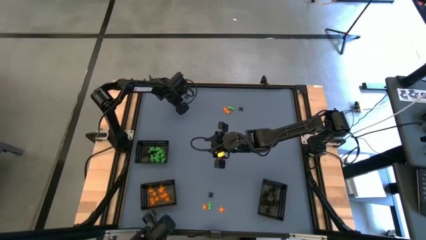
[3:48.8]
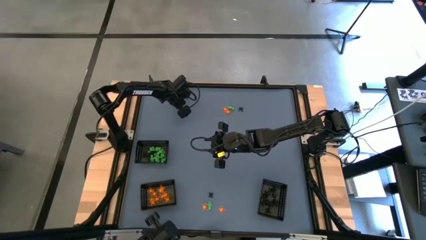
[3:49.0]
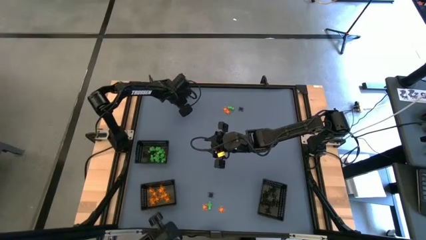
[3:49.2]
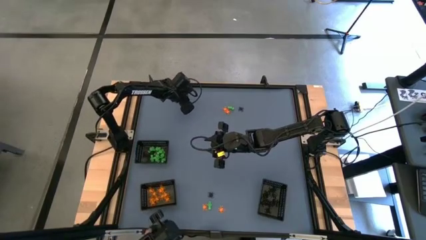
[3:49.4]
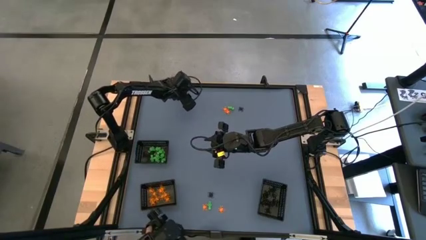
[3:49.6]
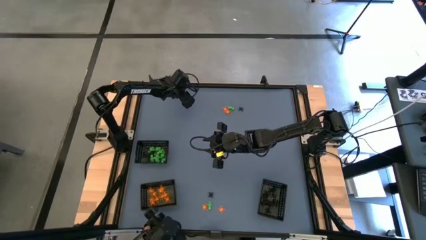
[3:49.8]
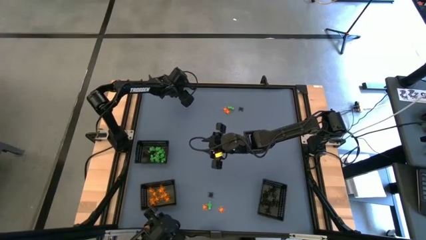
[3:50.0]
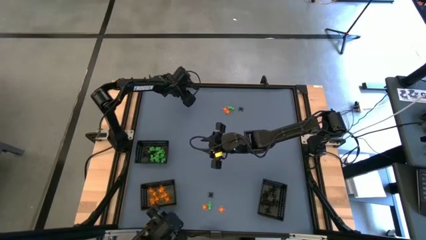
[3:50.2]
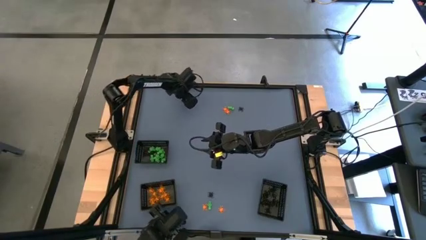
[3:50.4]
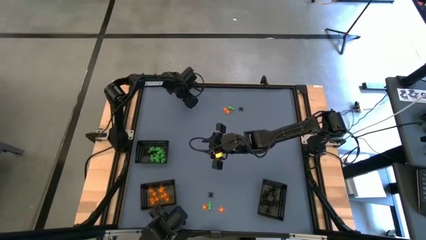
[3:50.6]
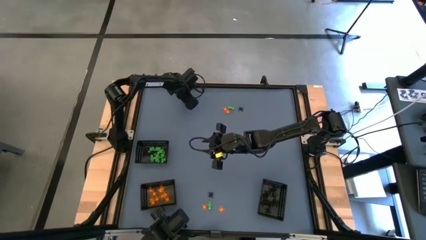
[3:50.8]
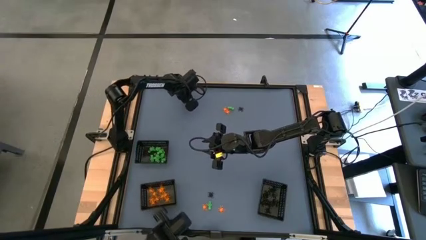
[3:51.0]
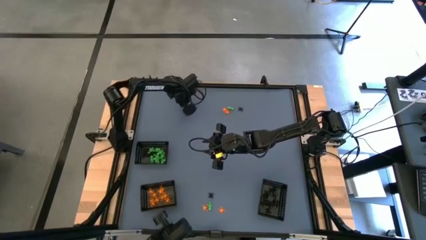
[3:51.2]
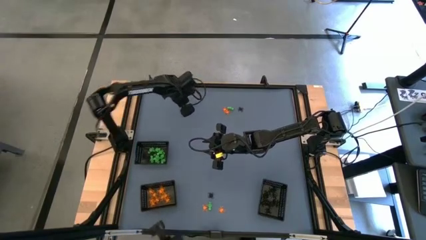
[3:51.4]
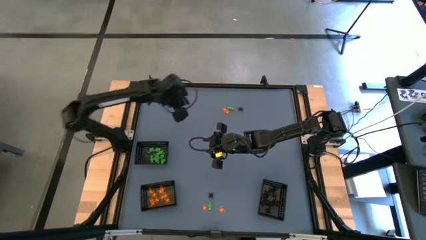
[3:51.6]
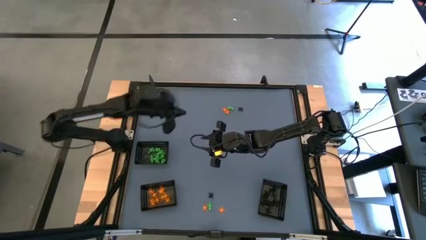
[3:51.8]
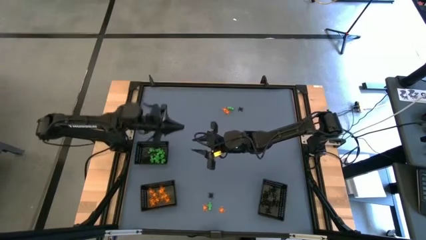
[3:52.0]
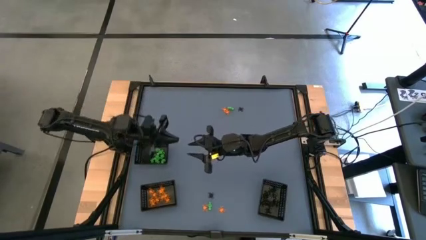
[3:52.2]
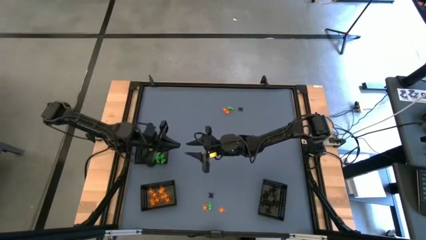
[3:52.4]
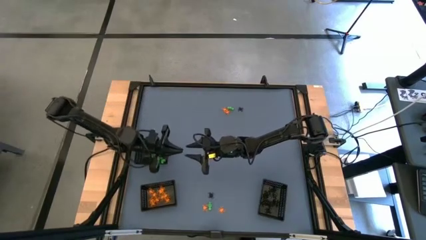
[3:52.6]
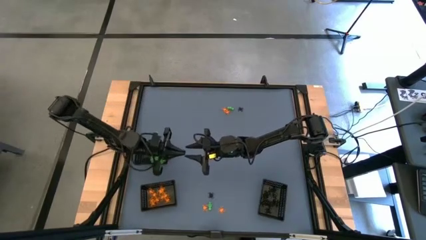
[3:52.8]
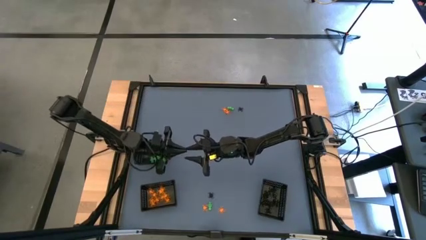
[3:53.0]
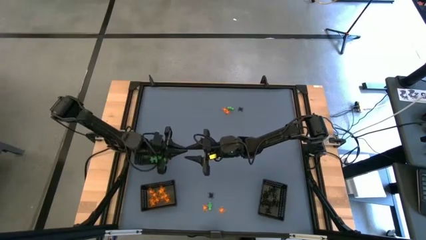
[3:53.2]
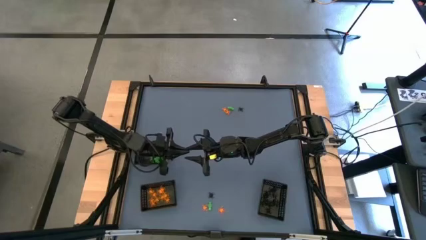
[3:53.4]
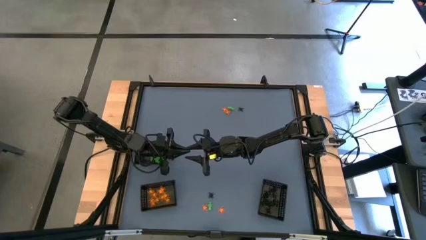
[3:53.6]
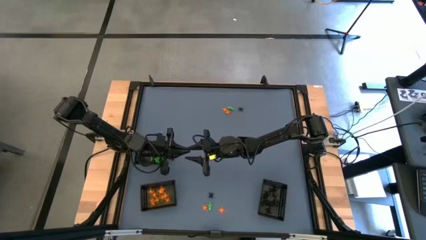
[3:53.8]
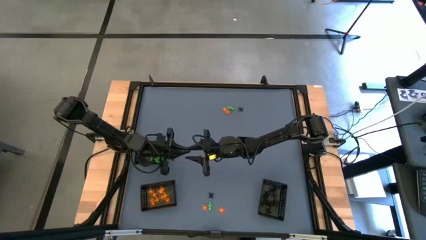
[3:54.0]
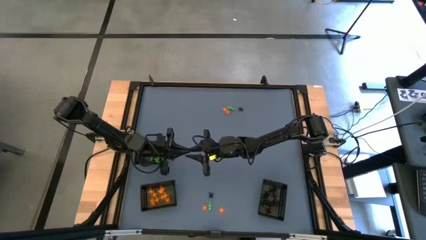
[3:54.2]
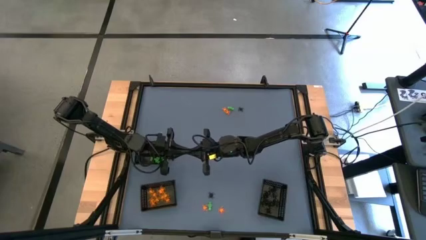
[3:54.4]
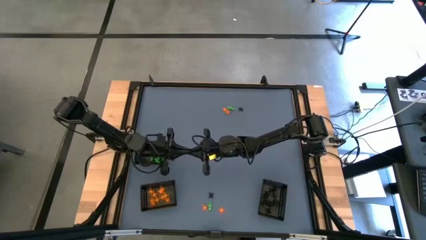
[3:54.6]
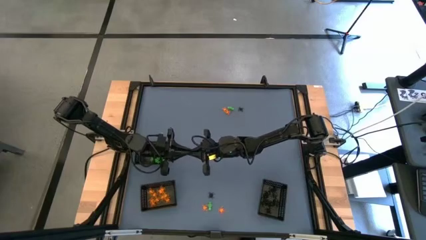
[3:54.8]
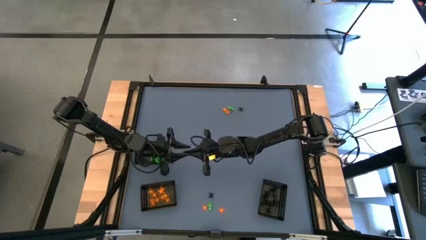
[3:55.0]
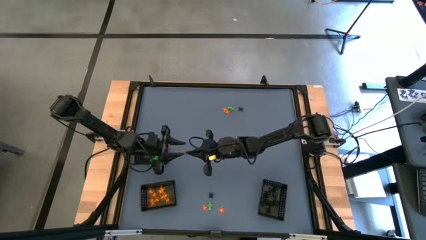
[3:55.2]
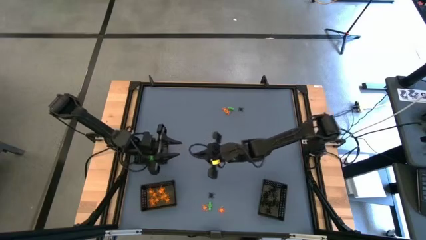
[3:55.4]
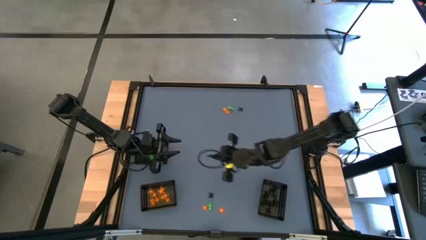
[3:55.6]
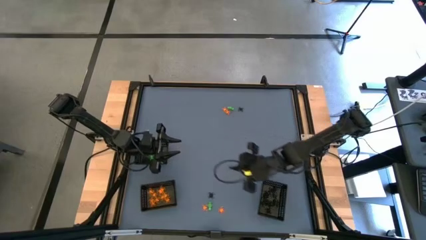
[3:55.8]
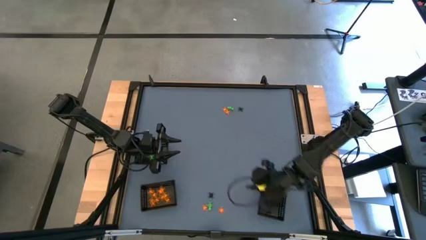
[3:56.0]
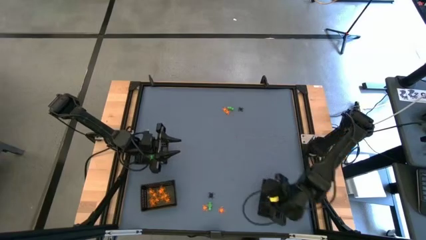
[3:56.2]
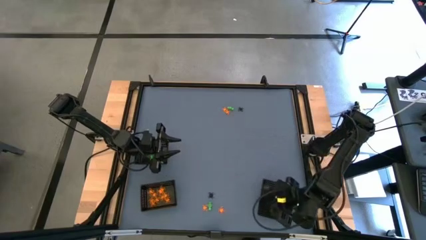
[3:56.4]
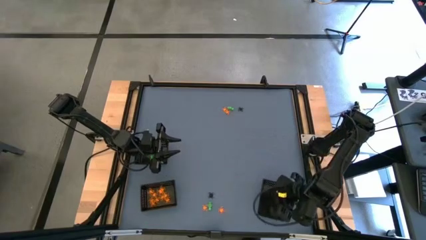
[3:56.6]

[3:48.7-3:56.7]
Task: Sort Halloween decoration
Put the black spider toy into the bottom right black bin

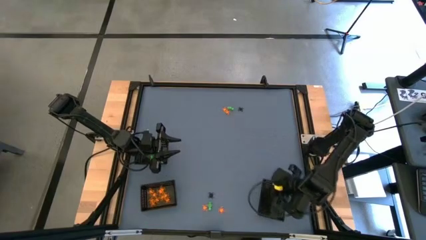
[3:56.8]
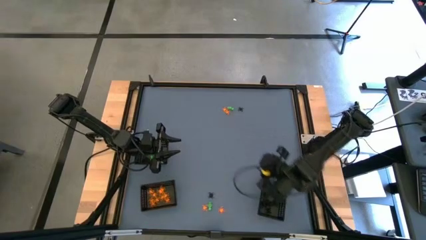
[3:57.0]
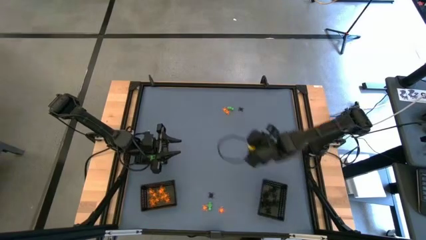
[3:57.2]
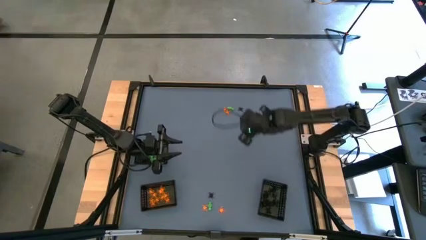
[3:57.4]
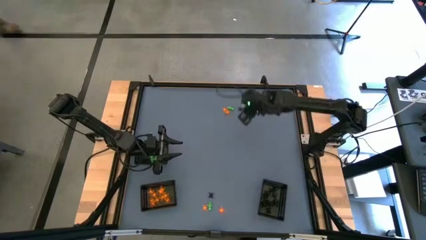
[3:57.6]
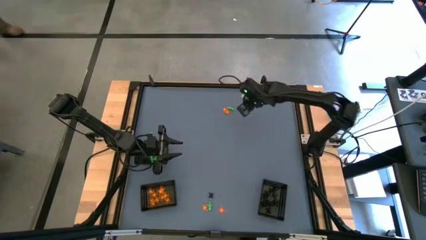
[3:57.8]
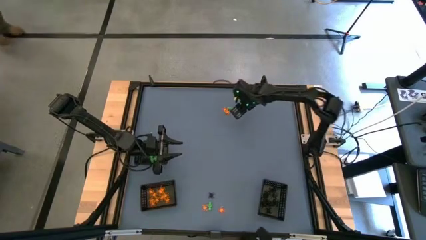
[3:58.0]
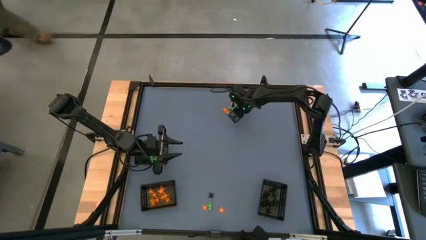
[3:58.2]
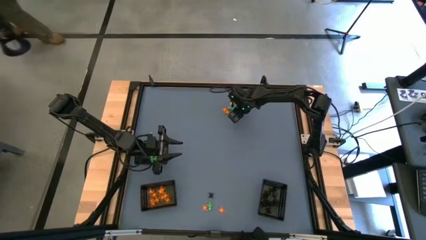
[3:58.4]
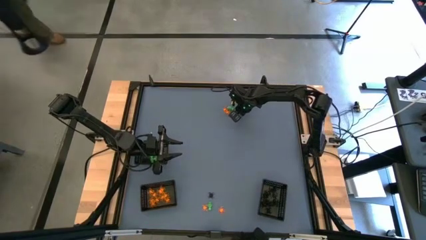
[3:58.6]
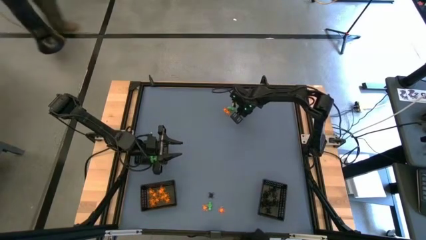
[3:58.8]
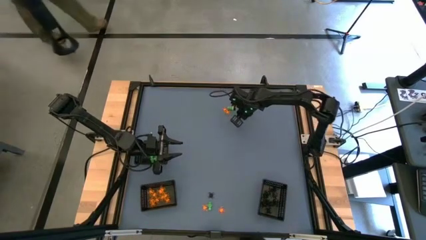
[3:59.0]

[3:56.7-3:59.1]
Put the black spider toy into the bottom right black bin

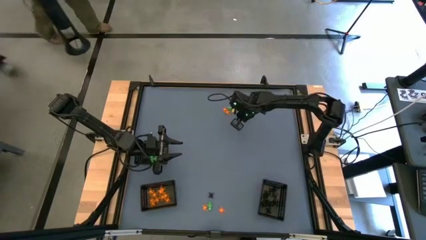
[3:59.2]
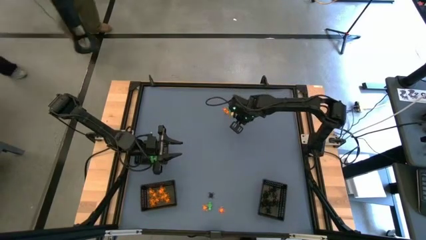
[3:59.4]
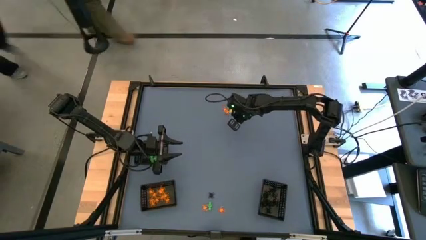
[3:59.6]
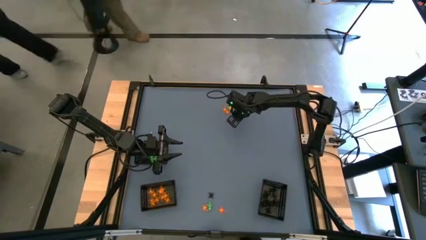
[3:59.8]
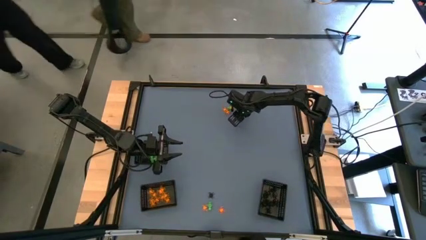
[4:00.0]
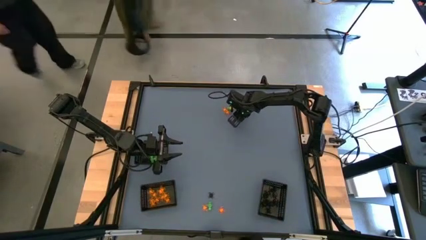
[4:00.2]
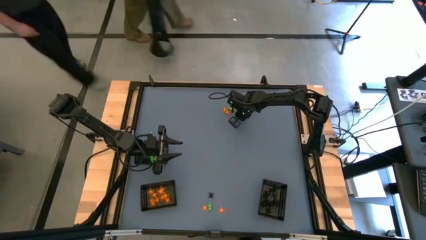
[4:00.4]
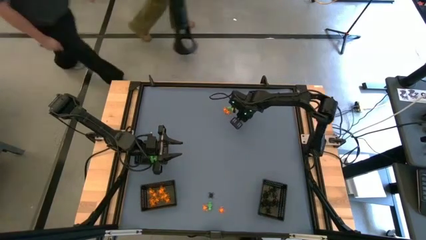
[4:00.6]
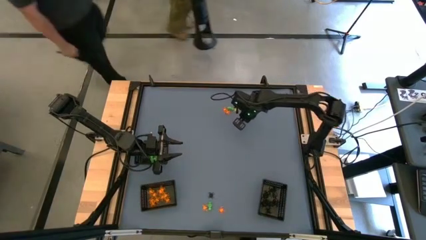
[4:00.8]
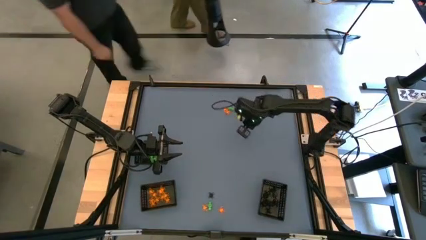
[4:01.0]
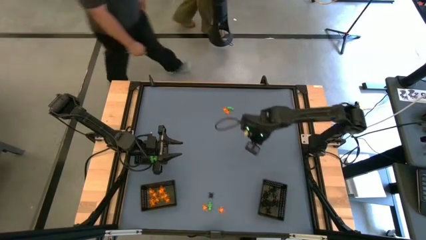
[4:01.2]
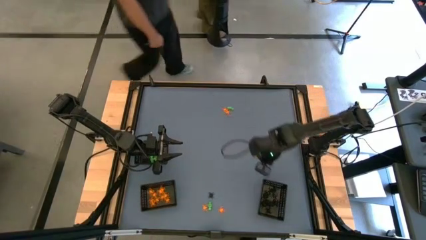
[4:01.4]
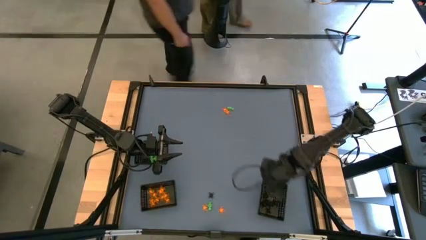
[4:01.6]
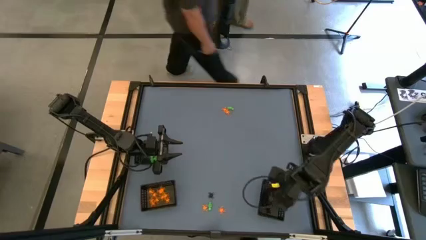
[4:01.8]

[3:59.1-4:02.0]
Put the black spider toy into the bottom right black bin

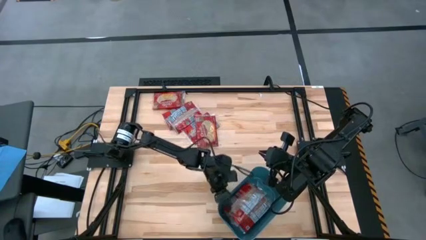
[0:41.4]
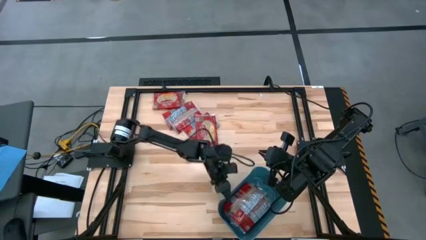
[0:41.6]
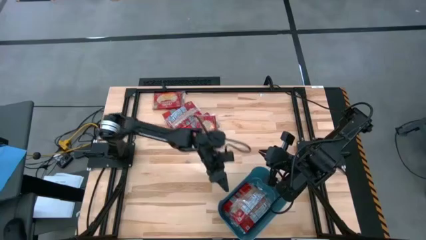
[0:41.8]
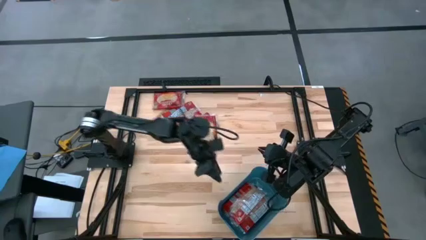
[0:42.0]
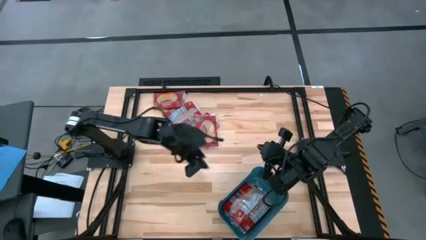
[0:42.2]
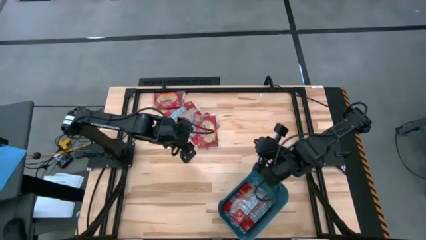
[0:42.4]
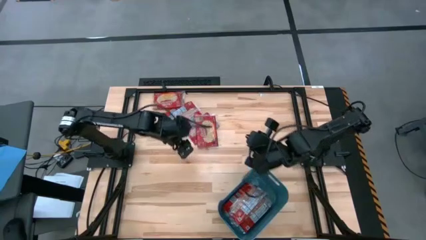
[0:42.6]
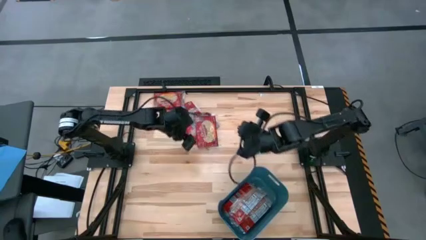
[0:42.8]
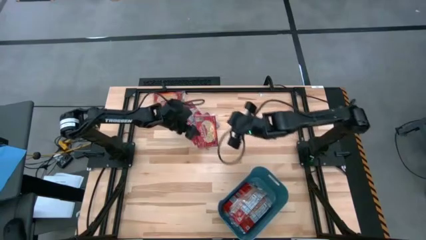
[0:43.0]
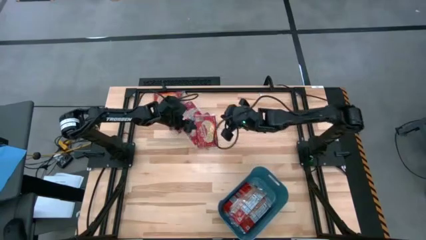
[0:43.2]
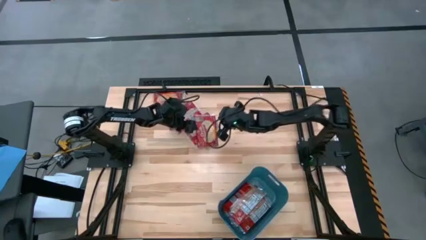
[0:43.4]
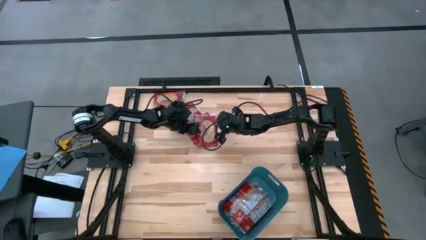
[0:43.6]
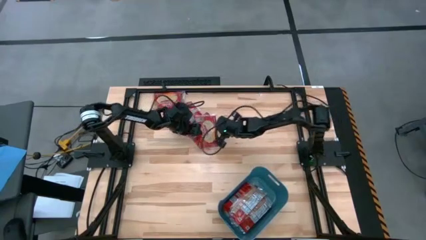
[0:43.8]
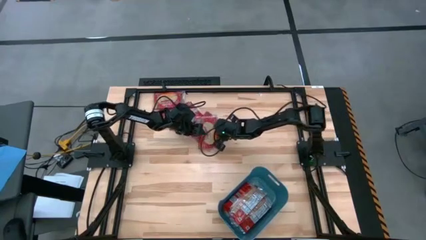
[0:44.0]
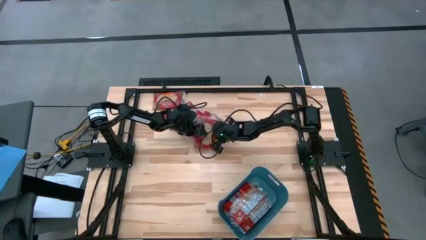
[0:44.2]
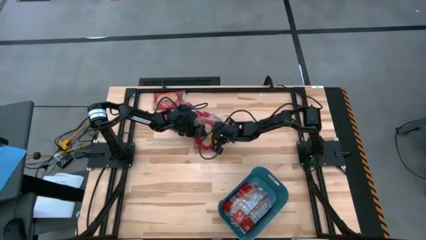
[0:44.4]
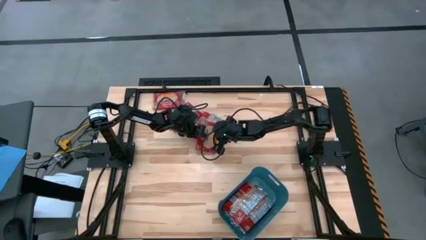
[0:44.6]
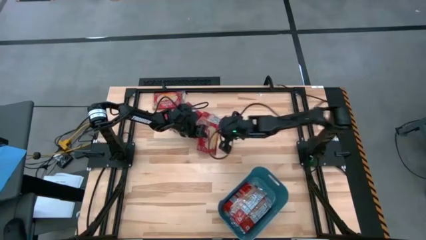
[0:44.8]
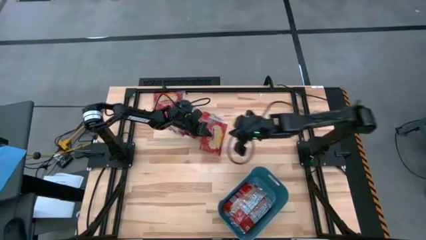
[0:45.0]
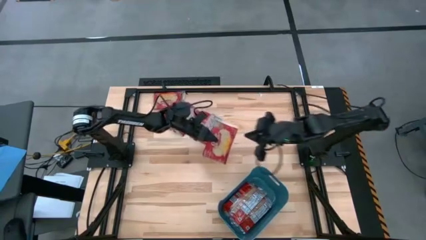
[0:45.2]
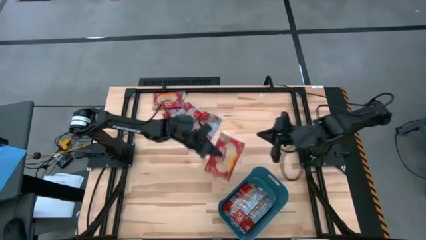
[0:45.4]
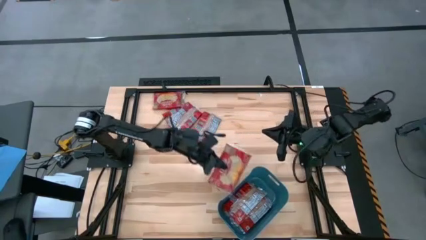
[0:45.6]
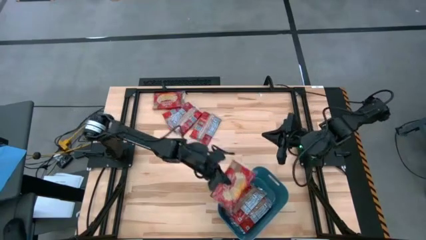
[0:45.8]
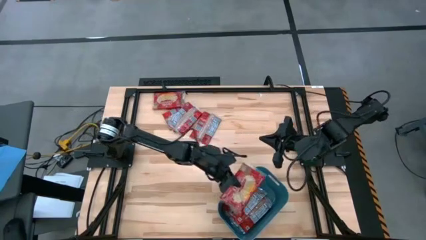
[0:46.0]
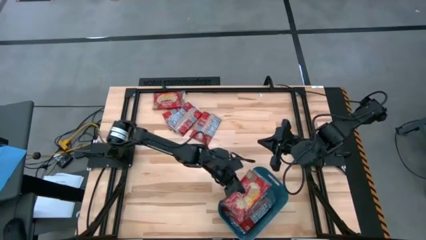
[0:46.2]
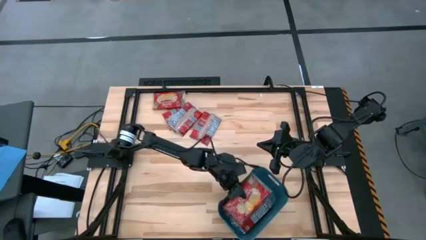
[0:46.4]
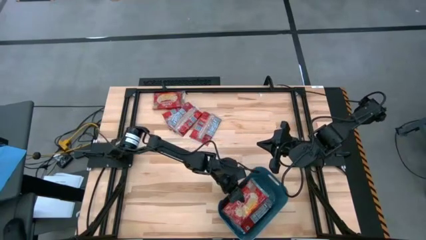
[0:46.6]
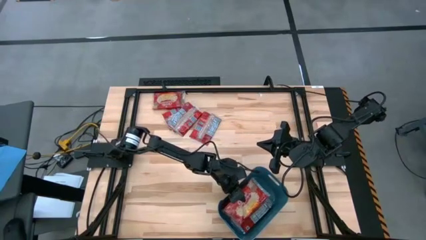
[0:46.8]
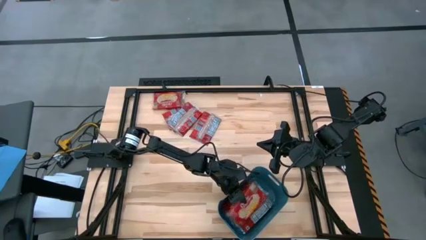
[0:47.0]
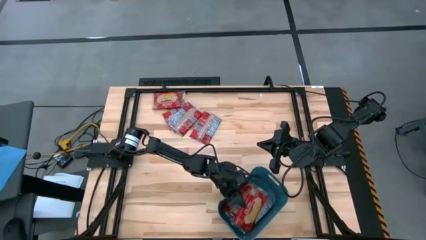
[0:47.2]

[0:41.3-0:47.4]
Task: Sort popcorn bags into baskets
Put the popcorn bag into the blue container
